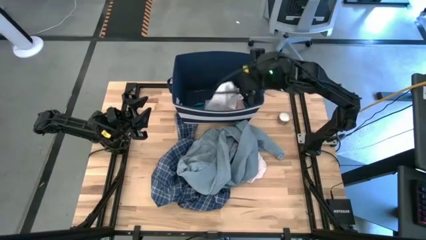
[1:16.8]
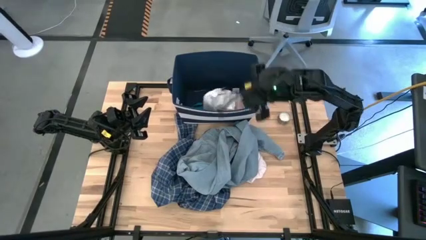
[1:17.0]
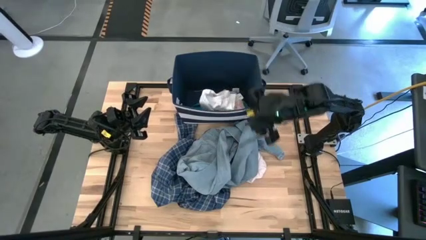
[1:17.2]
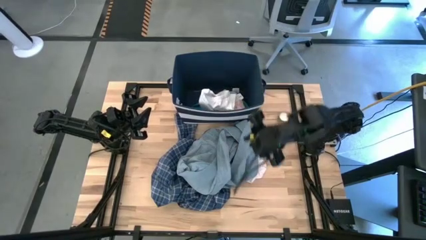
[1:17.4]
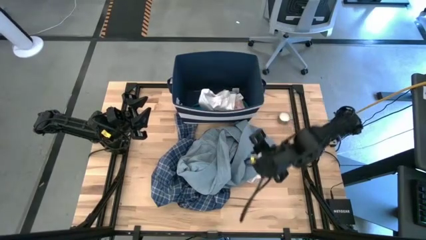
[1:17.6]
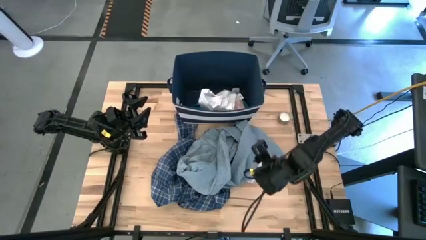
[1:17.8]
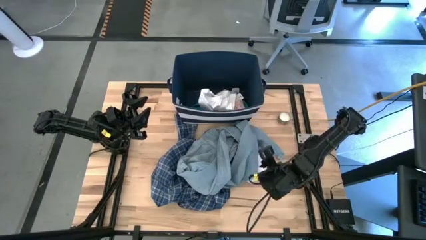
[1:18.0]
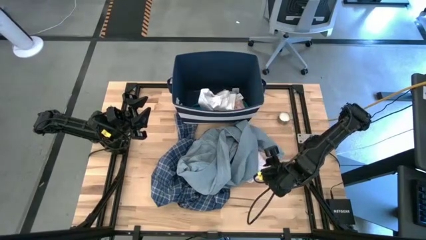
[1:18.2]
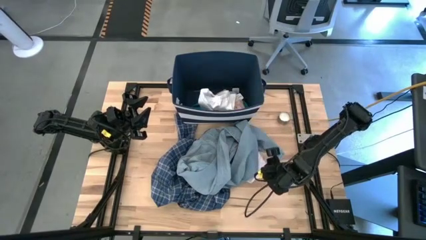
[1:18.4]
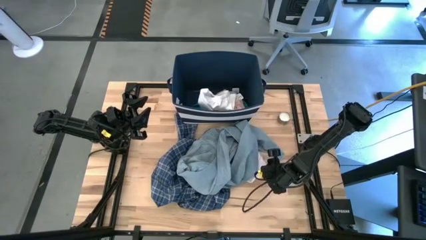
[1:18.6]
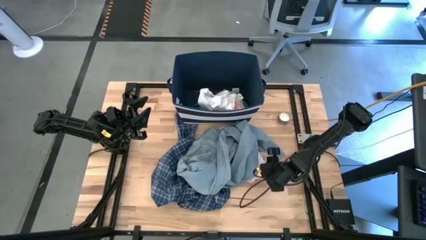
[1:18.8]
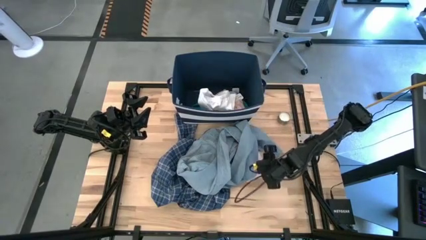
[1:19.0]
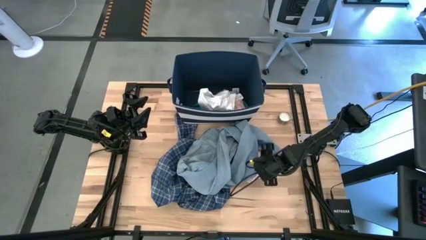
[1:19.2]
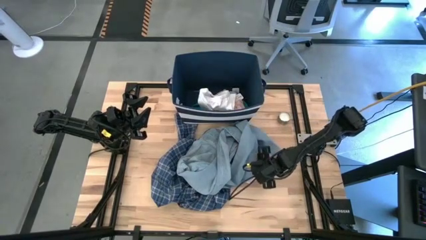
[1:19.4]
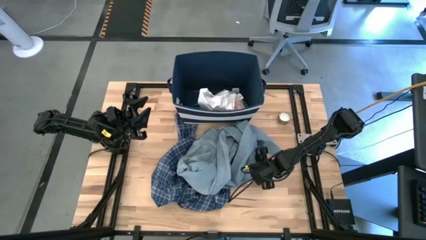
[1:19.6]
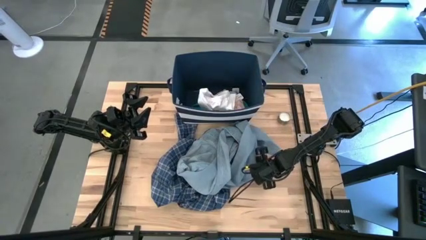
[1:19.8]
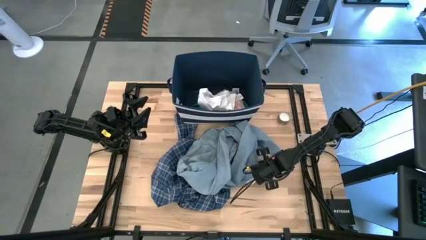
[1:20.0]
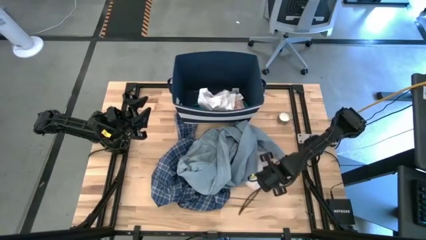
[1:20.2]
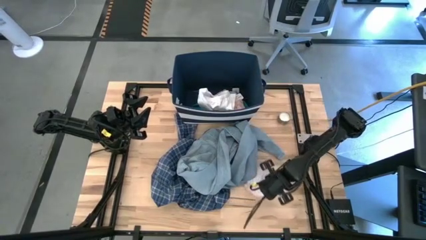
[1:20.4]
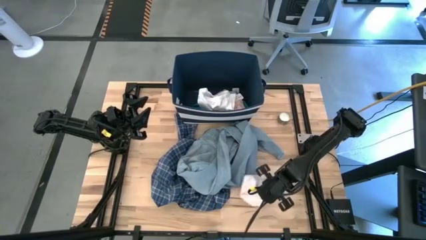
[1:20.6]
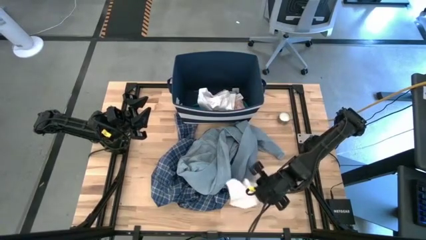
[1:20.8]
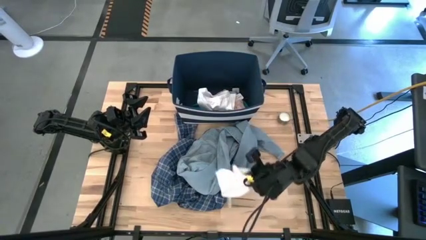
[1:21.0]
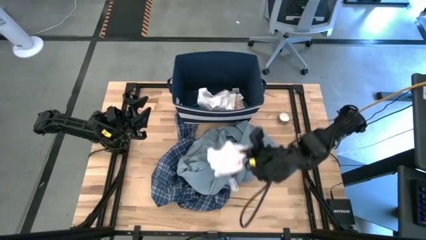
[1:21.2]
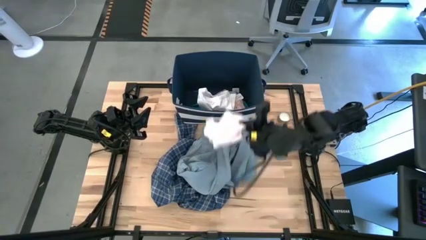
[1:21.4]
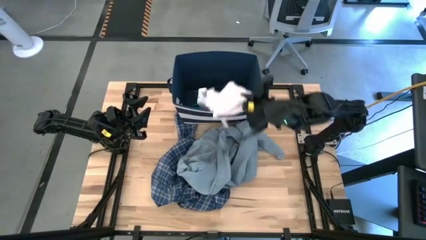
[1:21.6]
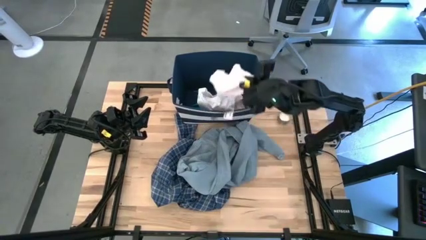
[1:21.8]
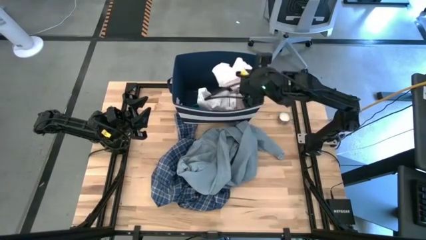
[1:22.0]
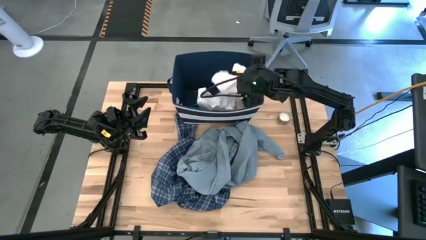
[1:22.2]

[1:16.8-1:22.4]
Task: Sort clothes
Put the white boxer into the blue laundry bin

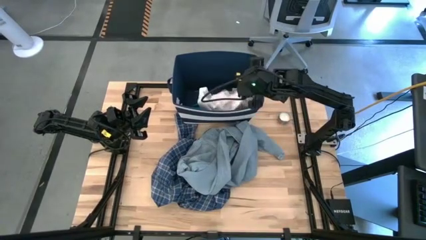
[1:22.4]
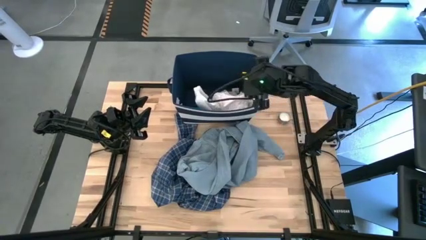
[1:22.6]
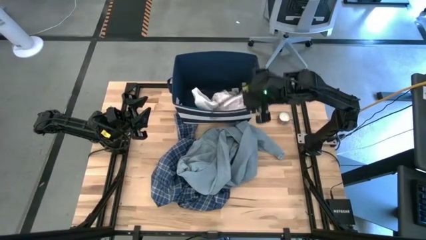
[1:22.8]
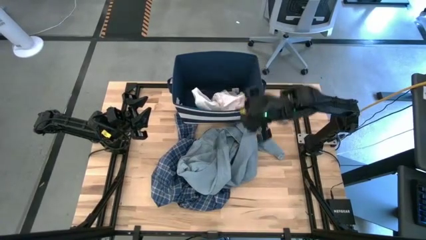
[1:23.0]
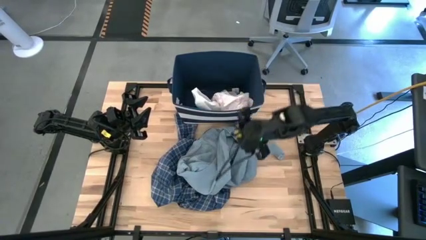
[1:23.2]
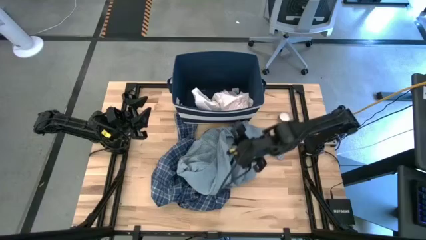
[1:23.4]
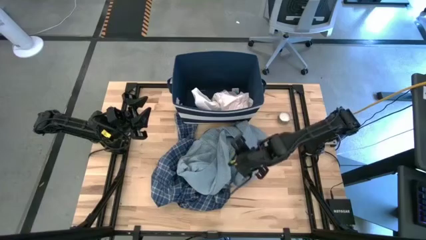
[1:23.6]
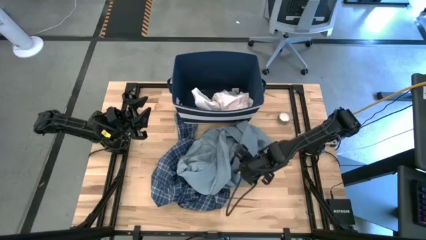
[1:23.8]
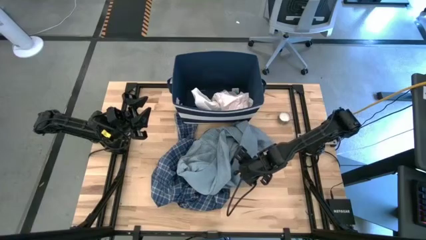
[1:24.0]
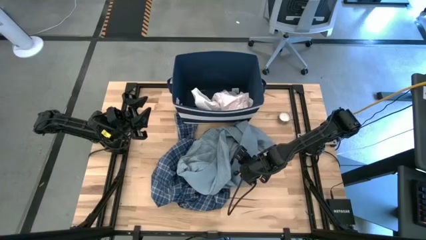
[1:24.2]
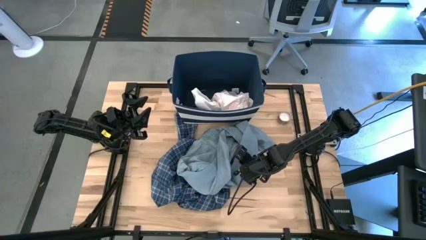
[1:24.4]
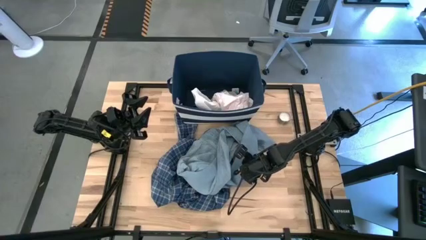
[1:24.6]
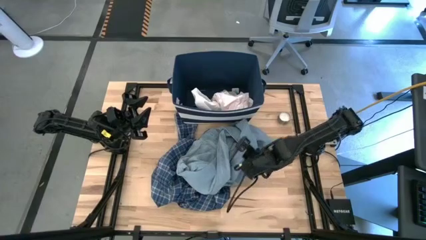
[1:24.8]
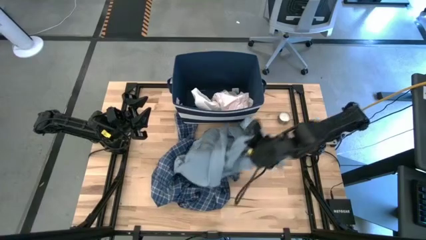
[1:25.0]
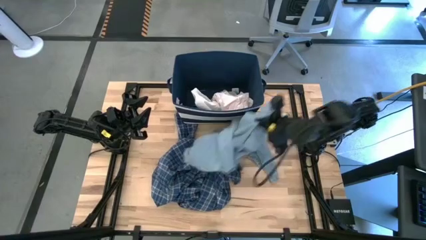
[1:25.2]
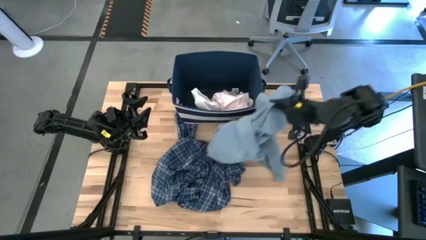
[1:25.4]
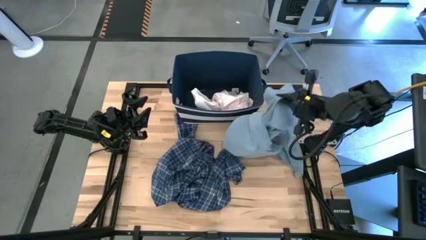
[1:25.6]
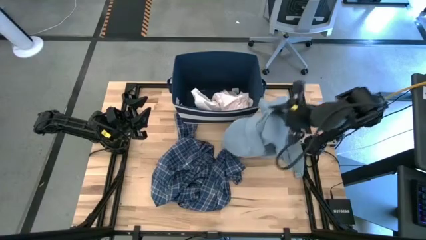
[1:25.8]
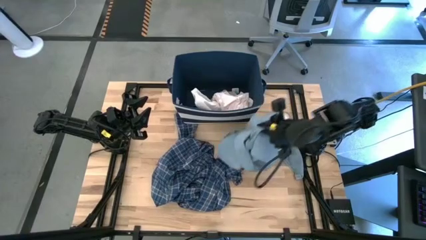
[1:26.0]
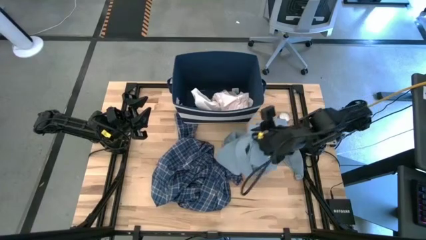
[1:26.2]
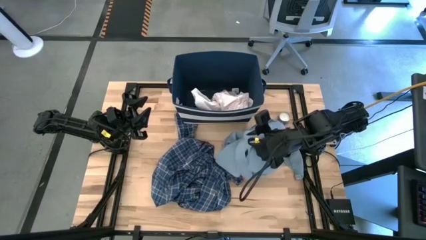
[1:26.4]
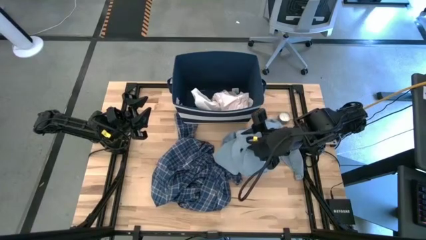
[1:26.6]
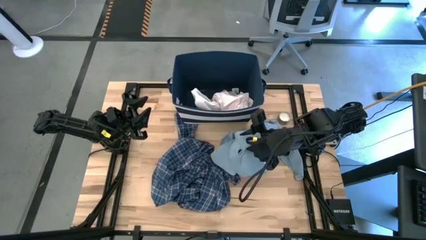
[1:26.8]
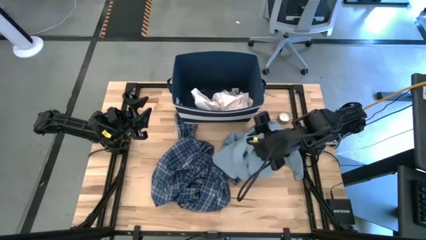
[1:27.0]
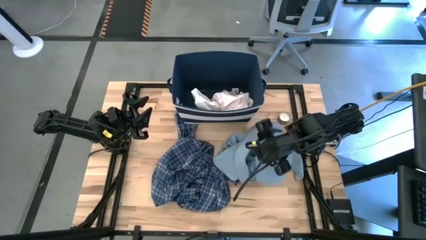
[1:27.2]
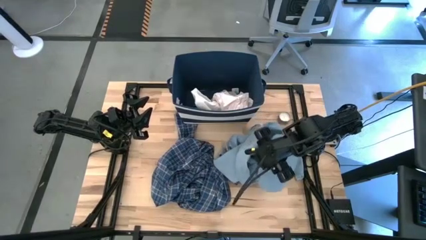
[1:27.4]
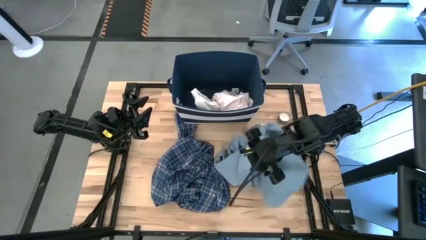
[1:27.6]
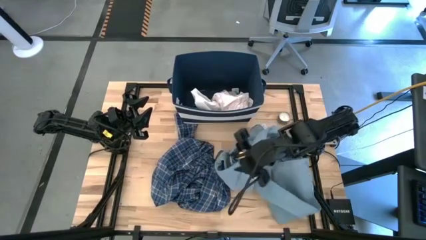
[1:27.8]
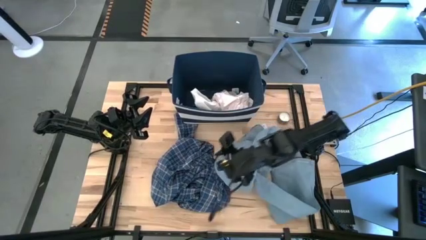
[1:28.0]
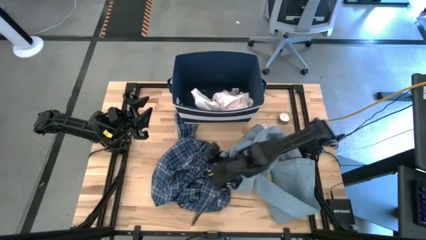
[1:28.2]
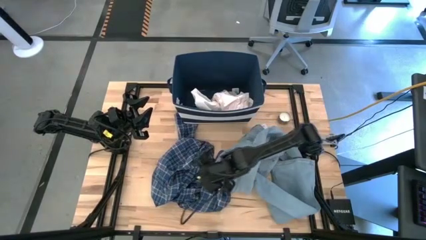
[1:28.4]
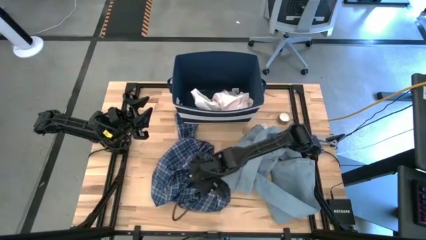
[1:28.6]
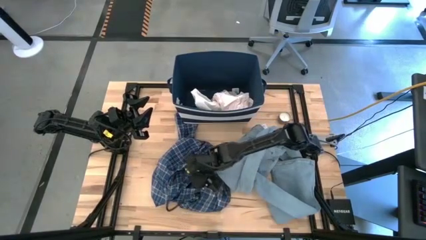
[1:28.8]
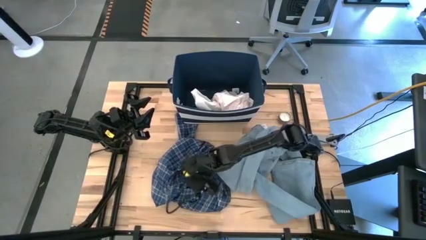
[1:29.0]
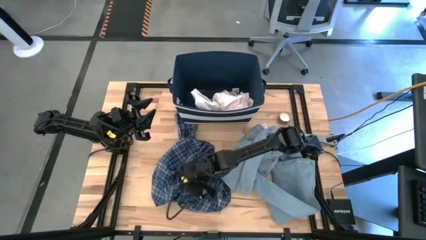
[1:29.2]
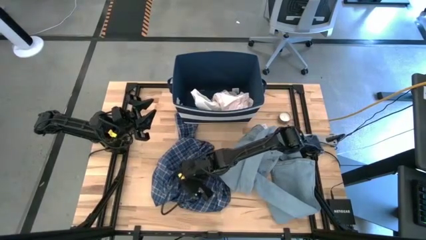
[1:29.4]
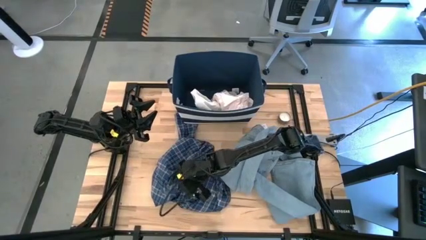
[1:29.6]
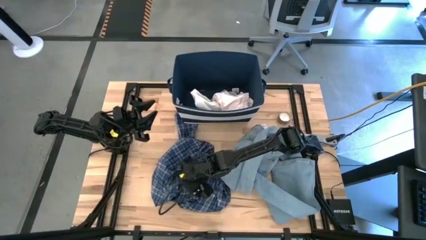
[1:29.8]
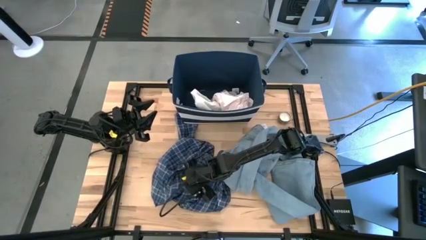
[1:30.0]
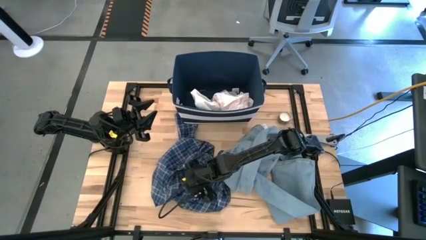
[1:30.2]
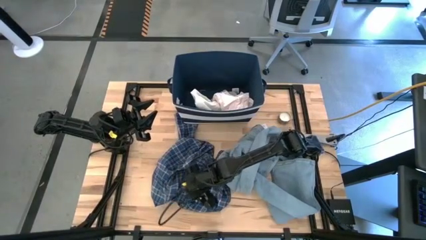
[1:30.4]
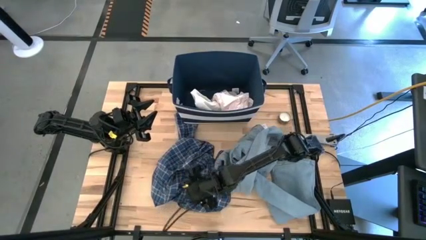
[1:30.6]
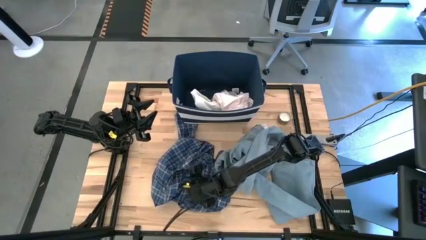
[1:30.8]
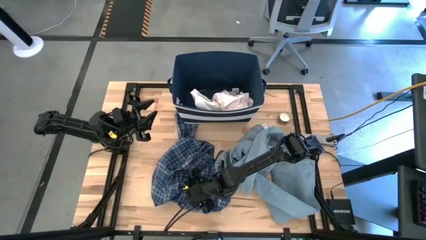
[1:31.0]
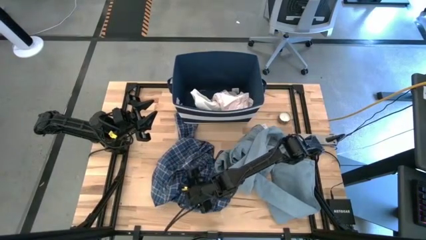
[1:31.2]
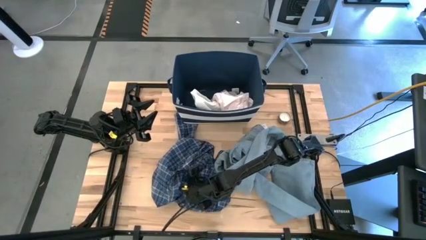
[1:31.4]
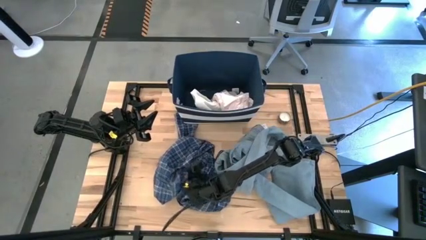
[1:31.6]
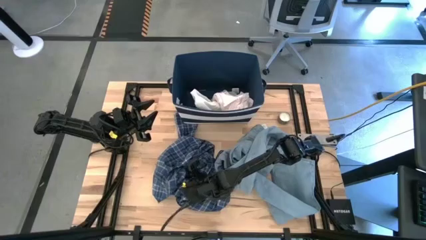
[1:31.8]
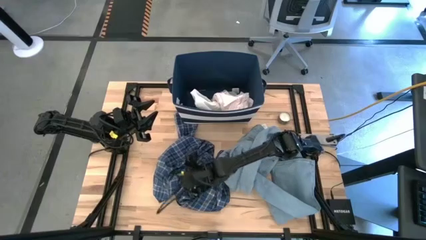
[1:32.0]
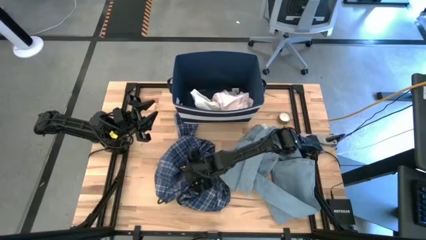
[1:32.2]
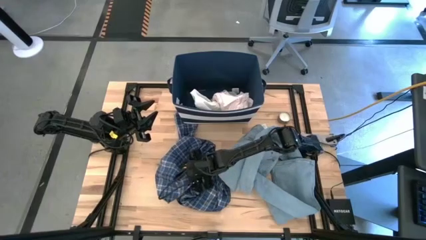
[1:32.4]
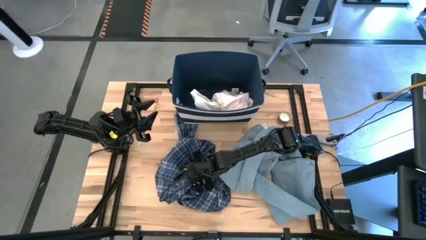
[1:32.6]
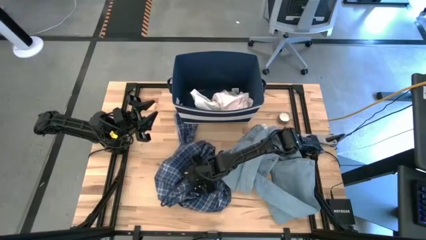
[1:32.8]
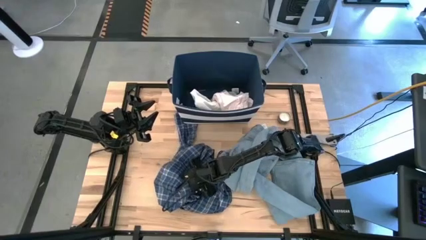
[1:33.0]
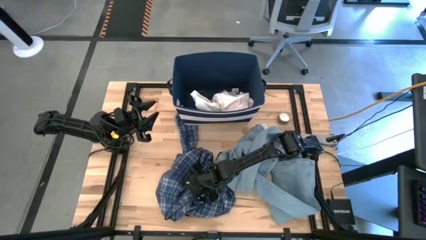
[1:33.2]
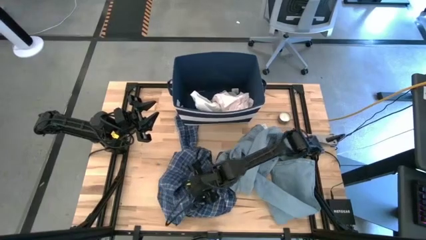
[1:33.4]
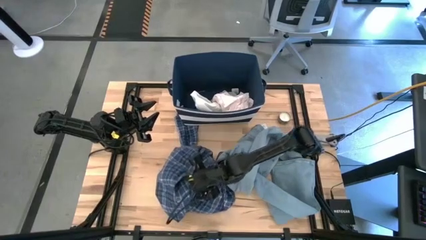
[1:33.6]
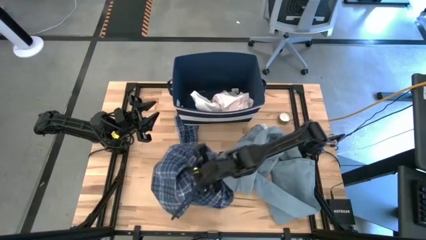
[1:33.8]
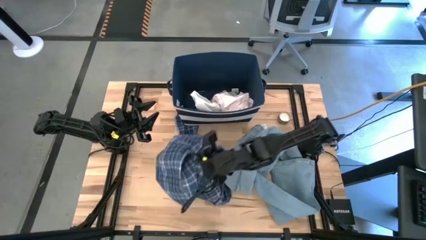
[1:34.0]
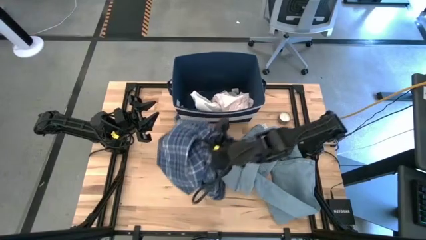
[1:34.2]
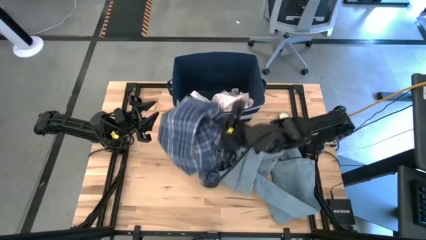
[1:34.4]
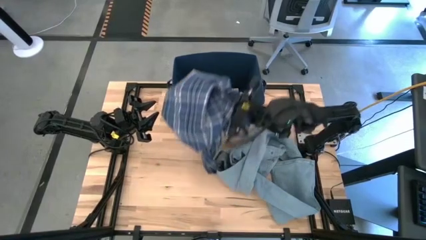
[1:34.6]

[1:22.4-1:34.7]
Put the blue long sleeve shirt into the blue laundry bin
